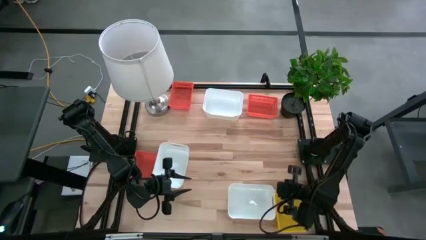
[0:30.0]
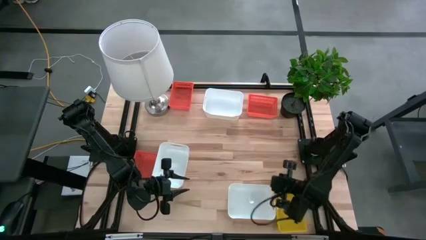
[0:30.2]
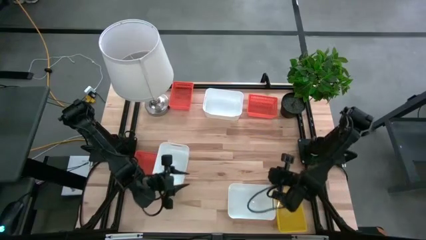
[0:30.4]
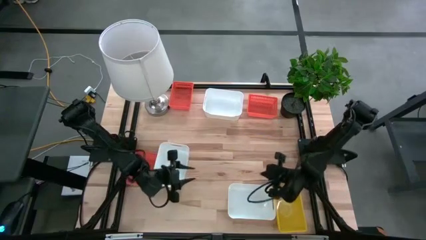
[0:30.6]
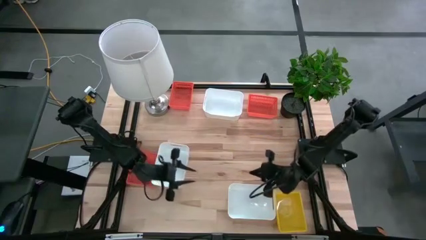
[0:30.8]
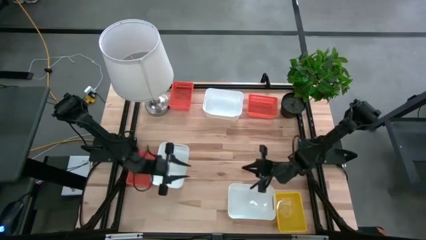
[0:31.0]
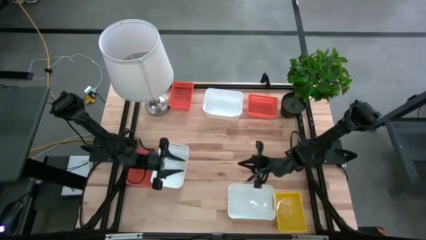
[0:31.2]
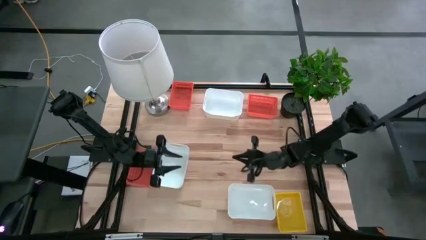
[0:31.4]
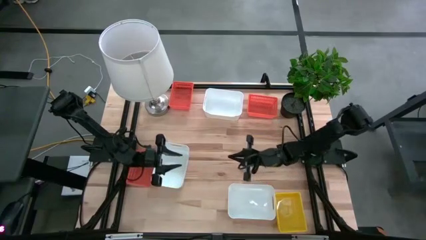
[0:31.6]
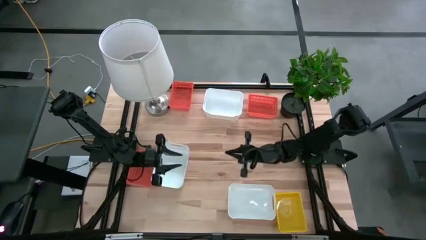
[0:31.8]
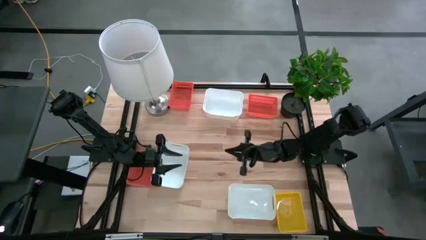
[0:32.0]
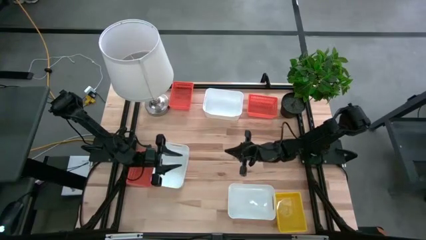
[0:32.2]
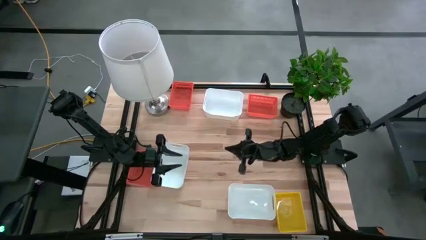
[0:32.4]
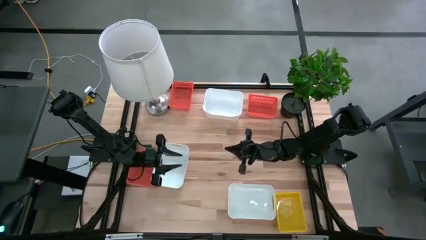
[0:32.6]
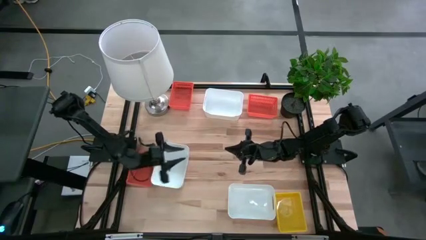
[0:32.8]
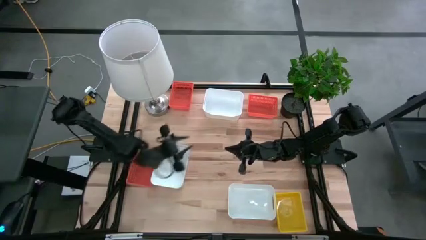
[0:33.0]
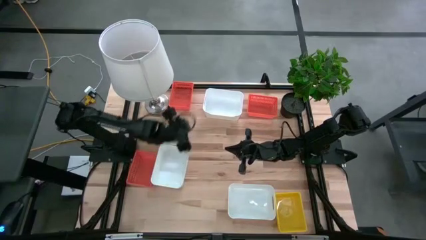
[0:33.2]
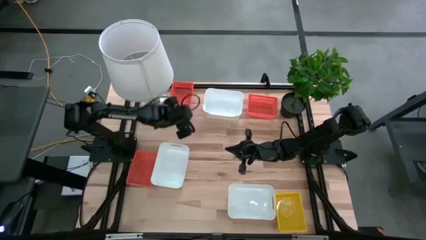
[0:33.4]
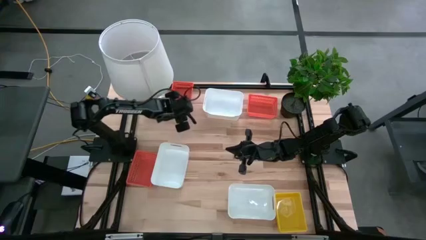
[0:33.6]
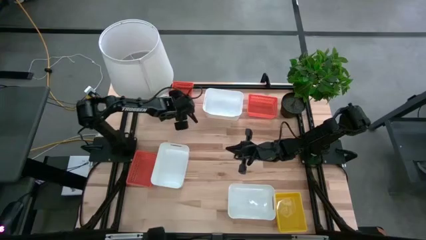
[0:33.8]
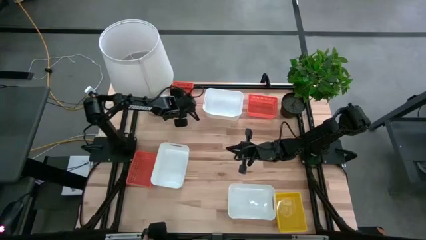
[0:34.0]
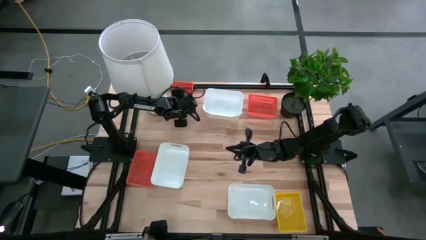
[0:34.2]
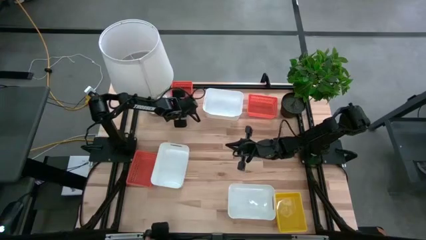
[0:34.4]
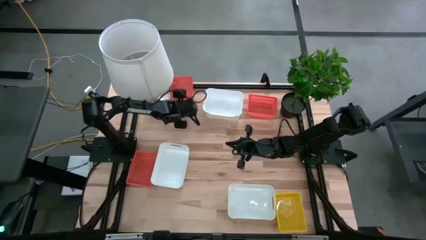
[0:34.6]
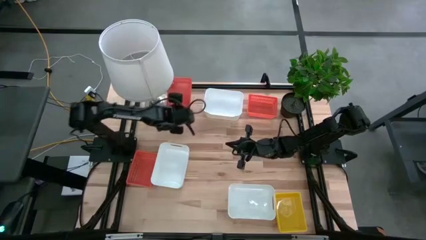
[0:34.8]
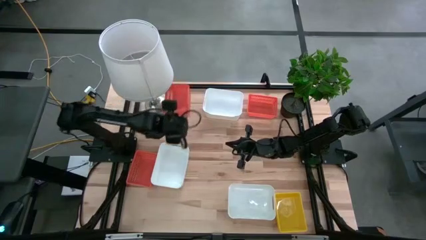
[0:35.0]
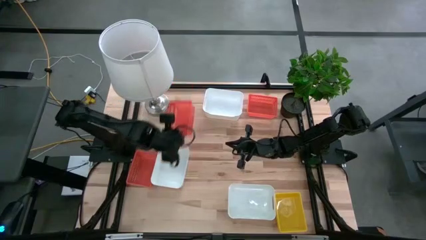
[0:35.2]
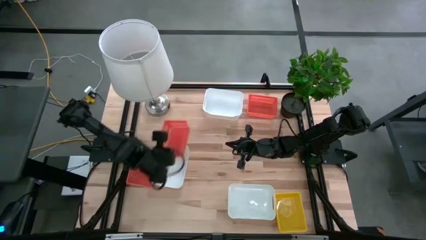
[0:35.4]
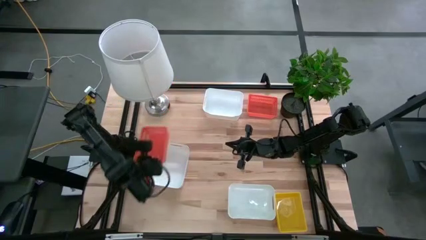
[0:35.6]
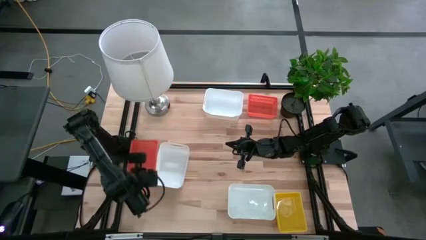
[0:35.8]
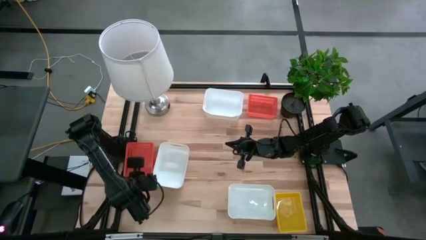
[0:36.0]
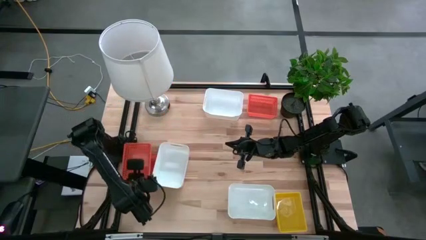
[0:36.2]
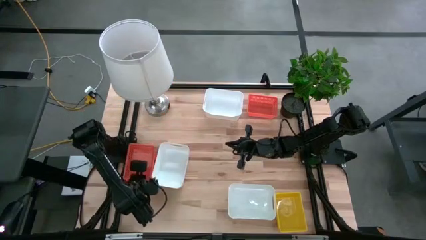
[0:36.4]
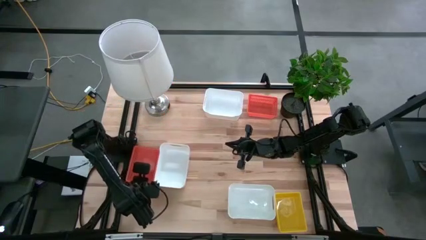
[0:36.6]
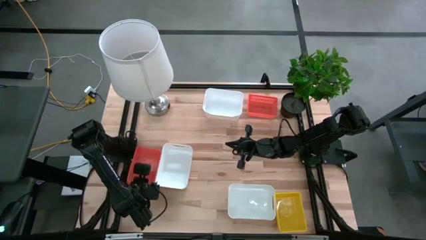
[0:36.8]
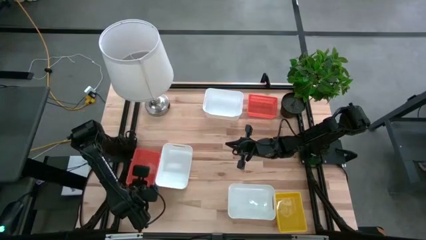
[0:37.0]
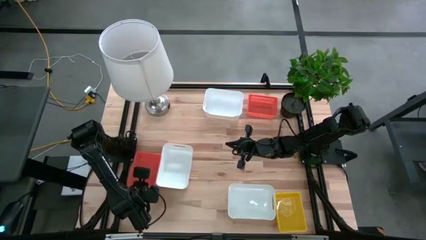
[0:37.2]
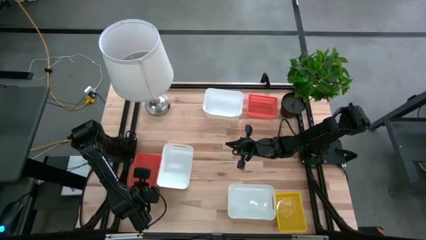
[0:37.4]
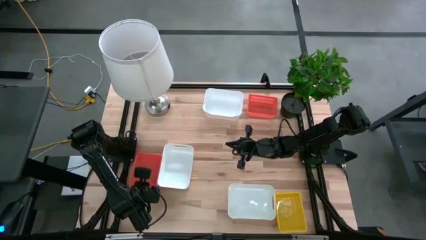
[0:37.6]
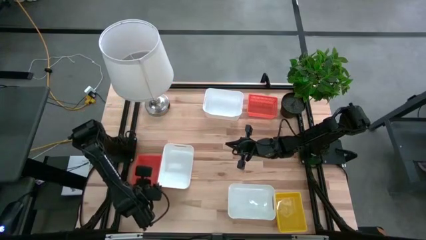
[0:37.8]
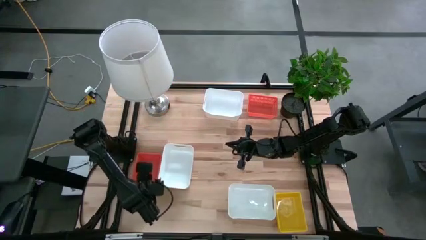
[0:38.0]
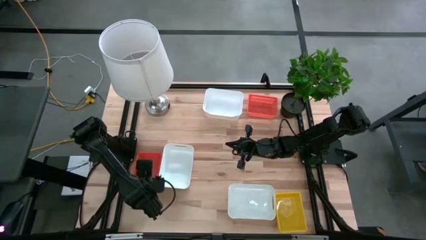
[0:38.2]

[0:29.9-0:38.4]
Stack the top left orange bin on the bottom orange bin

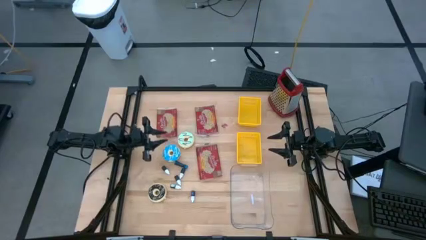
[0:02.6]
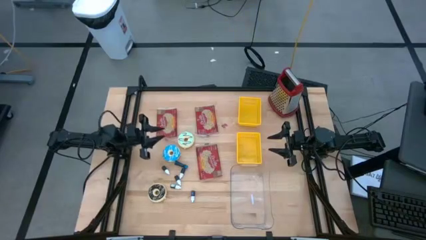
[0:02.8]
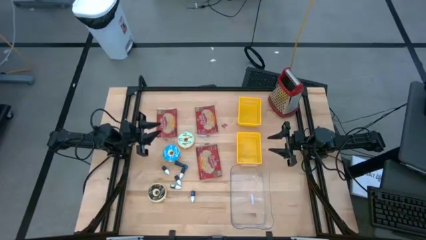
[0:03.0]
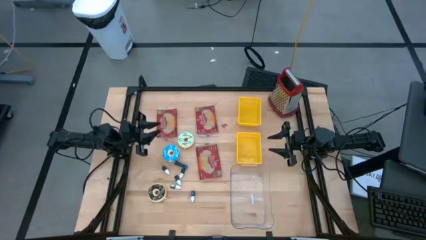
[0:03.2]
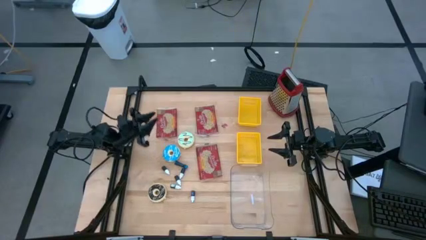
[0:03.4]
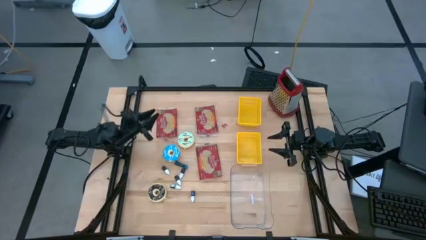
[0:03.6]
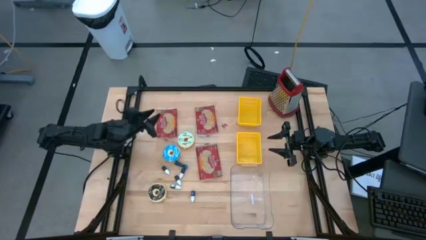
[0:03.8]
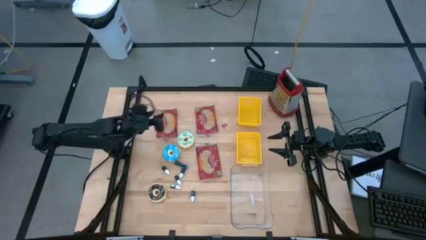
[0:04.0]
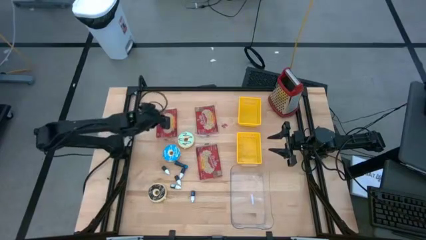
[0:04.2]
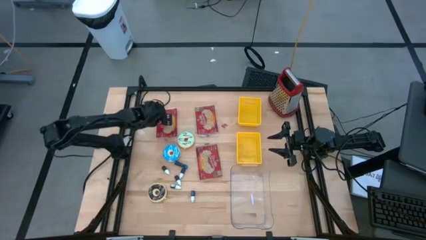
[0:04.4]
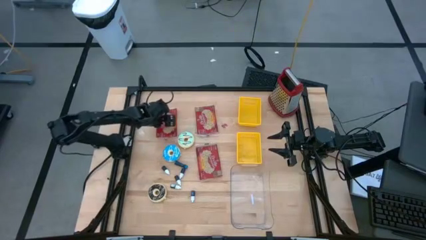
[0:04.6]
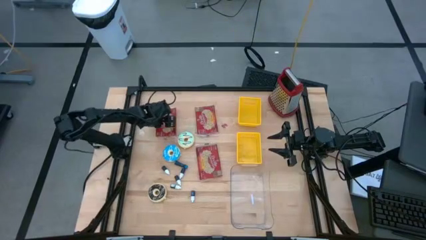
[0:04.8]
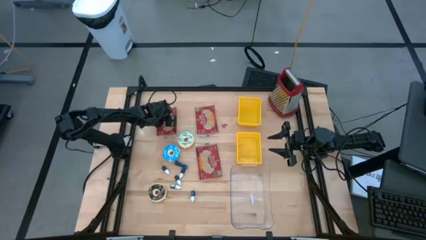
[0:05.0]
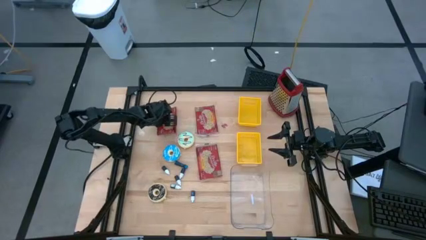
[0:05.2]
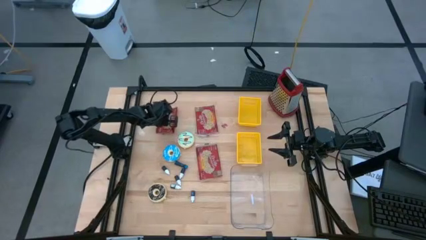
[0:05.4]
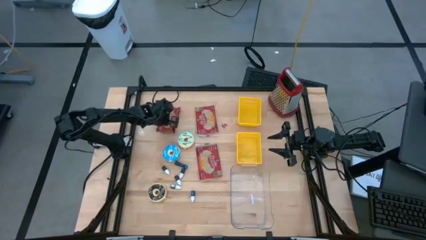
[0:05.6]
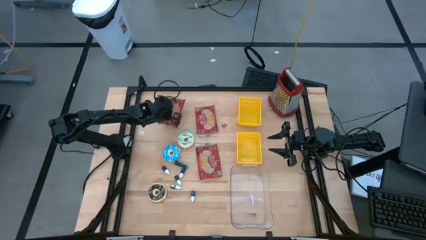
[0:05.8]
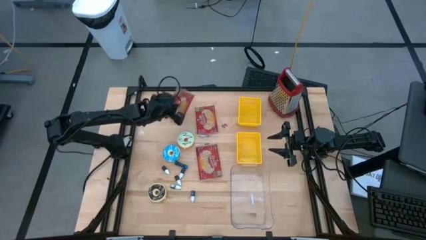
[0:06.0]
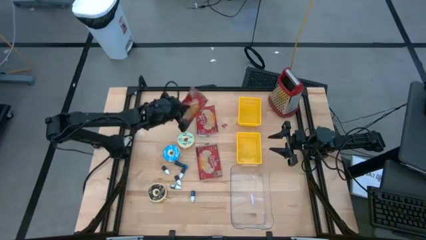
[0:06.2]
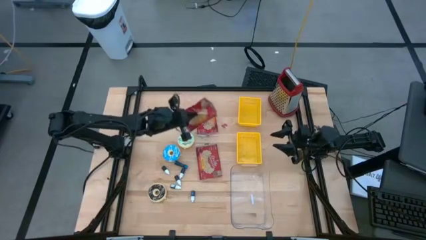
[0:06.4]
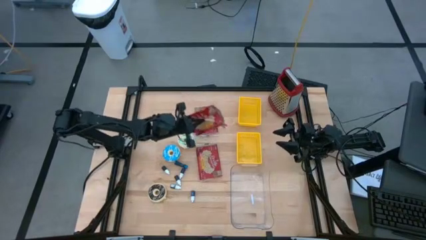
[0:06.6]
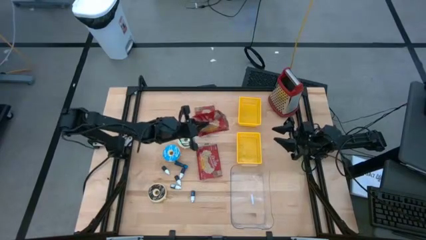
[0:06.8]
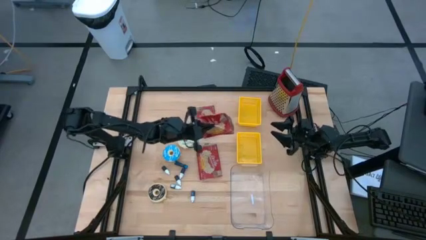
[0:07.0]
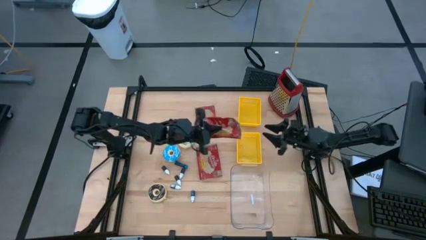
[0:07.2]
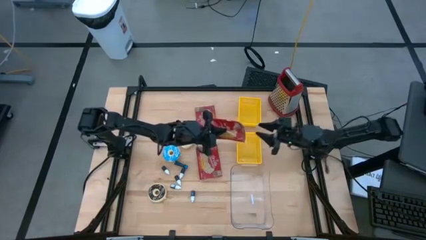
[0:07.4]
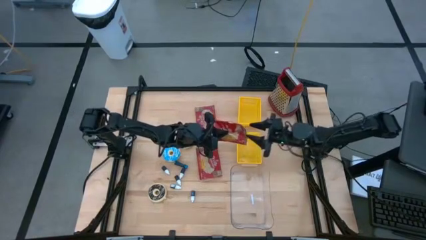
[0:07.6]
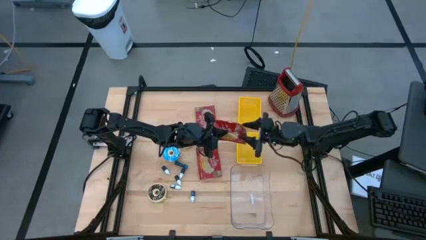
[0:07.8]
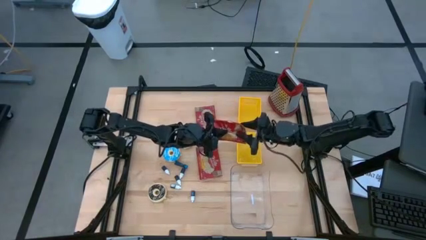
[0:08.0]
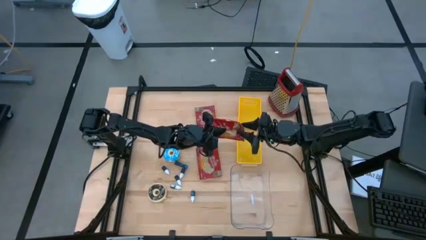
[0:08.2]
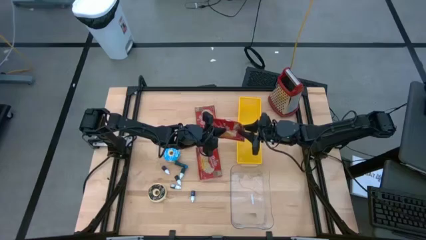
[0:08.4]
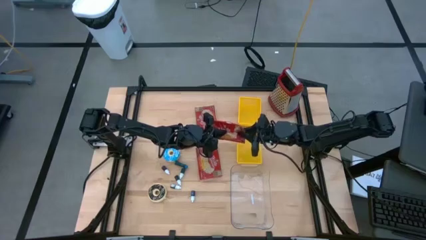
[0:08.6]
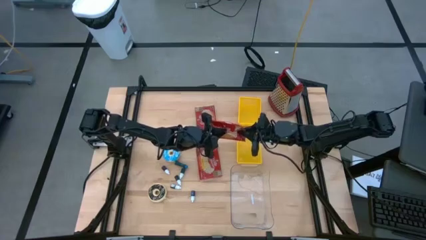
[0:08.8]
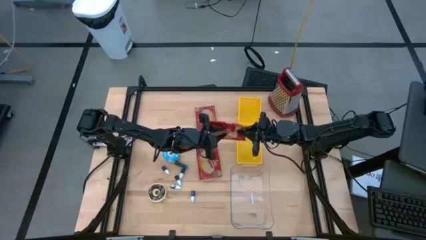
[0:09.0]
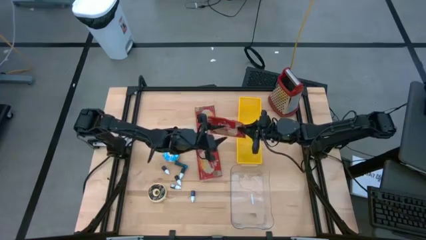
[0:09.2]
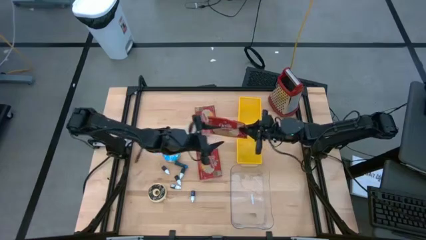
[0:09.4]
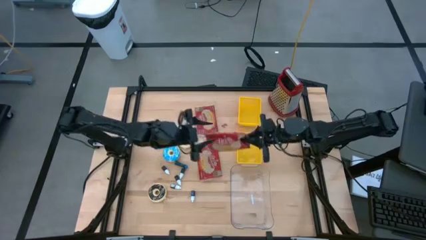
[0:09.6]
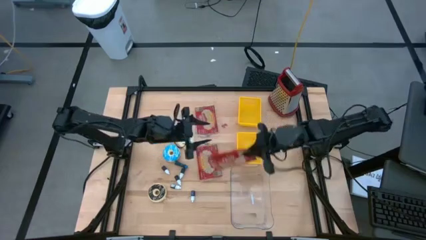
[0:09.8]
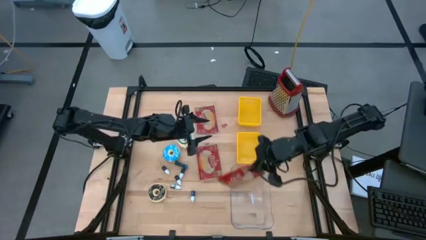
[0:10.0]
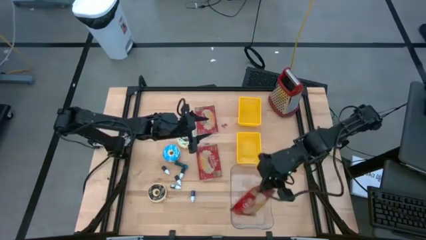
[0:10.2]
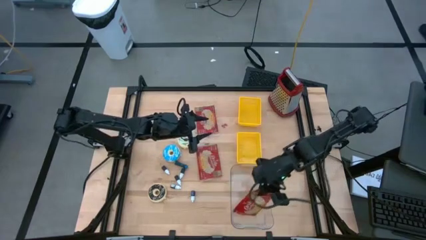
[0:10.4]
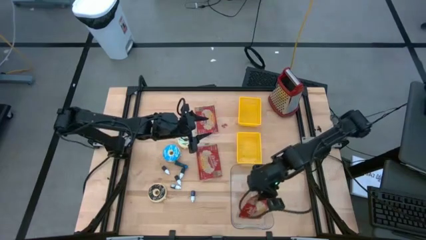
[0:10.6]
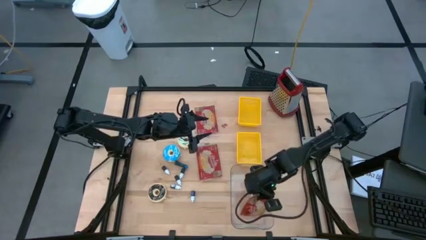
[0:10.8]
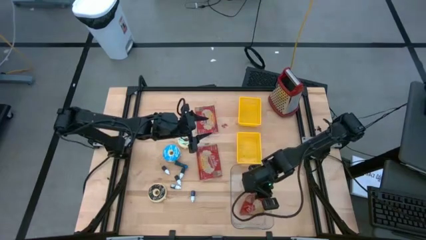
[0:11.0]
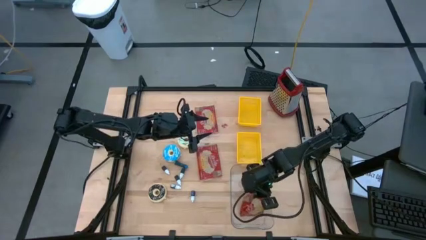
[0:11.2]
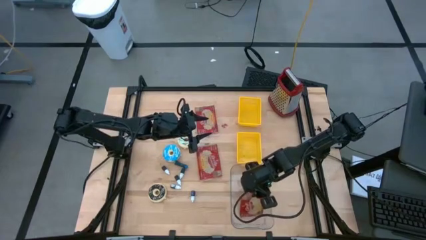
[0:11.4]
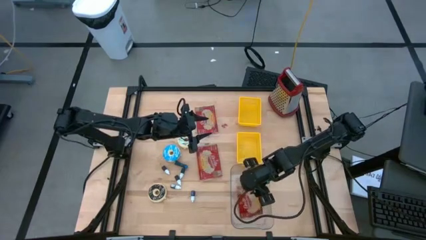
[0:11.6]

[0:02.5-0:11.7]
Put the top left red popcorn bag into the transparent bin
